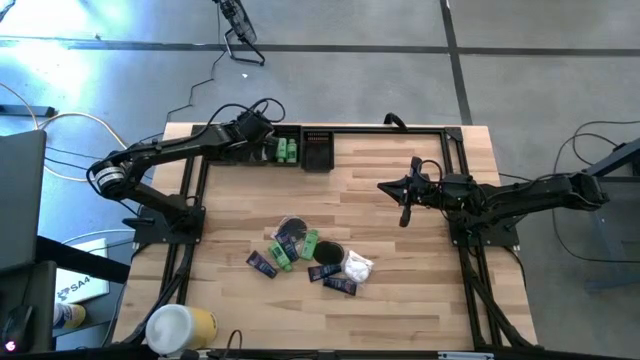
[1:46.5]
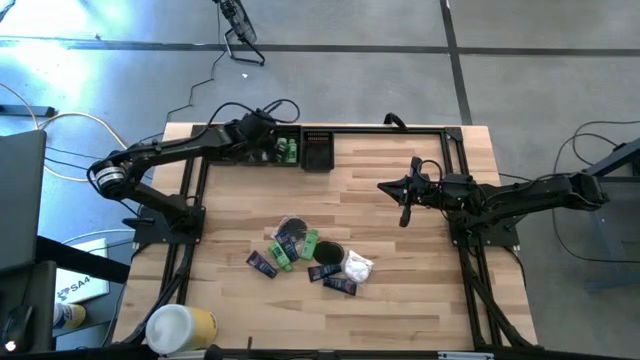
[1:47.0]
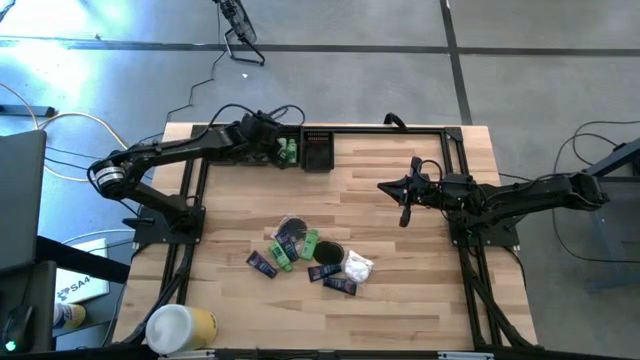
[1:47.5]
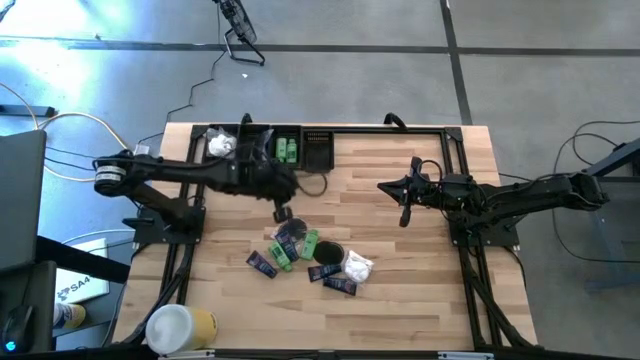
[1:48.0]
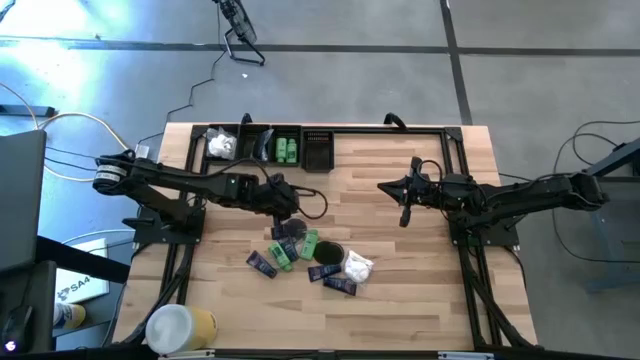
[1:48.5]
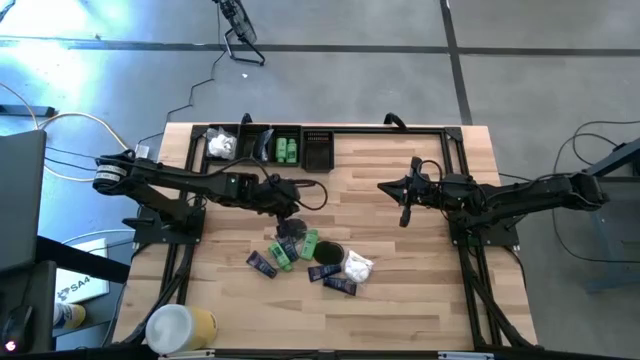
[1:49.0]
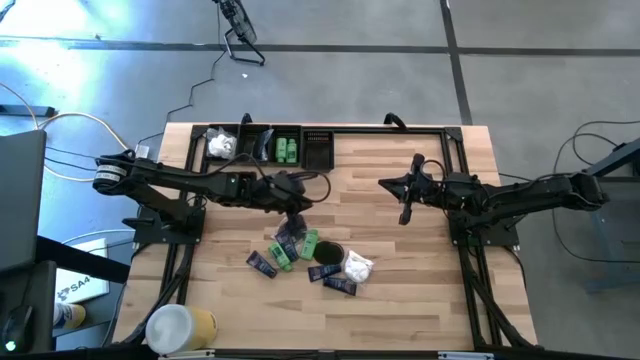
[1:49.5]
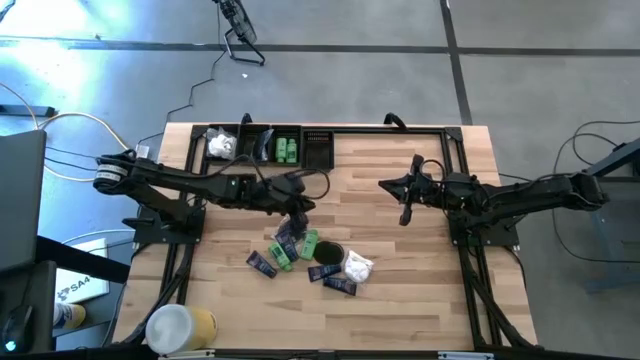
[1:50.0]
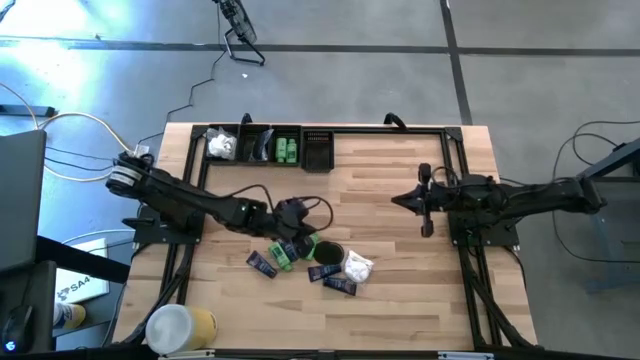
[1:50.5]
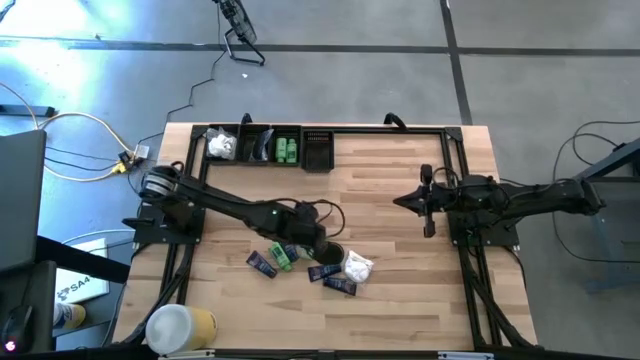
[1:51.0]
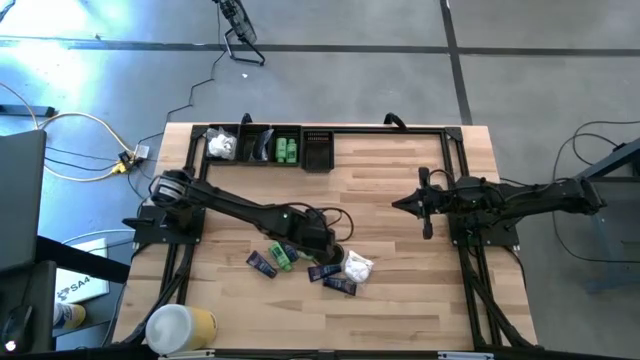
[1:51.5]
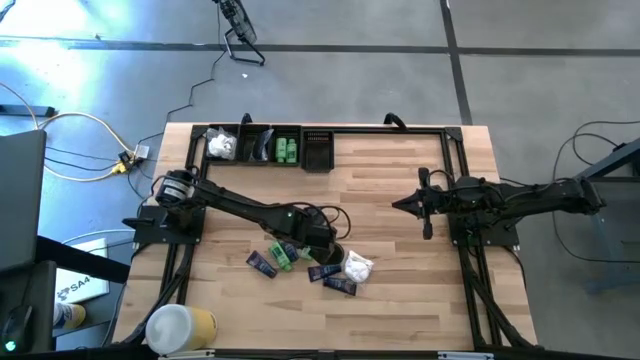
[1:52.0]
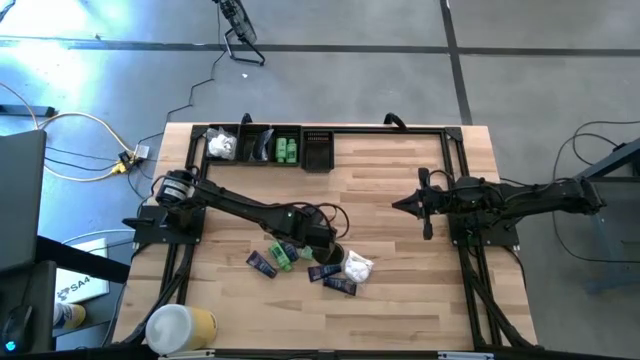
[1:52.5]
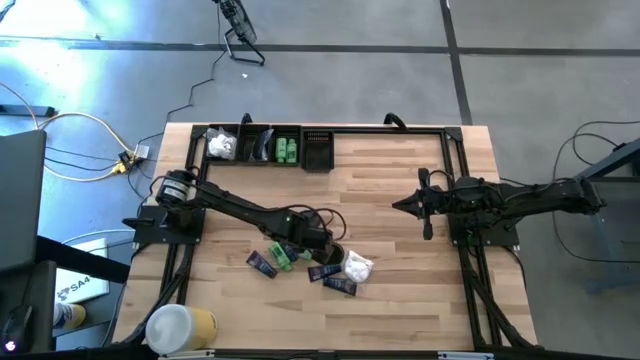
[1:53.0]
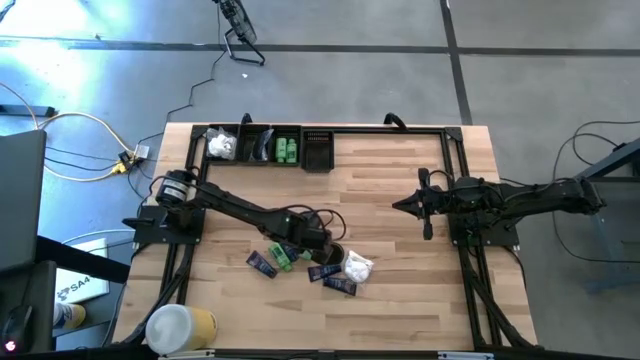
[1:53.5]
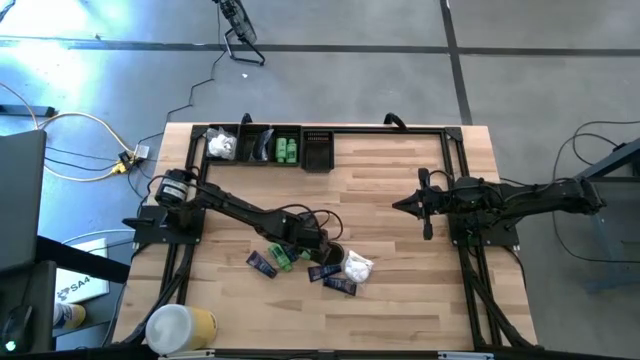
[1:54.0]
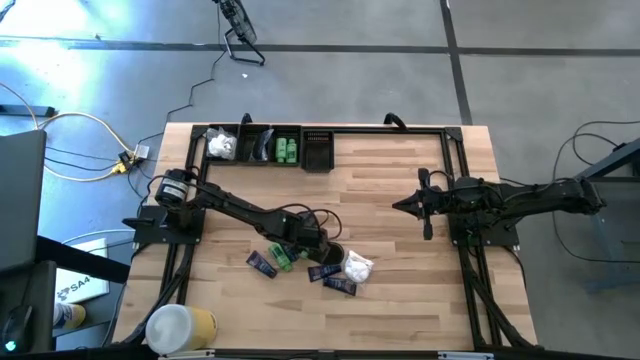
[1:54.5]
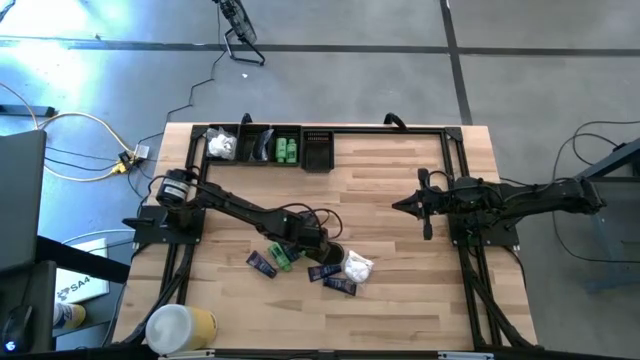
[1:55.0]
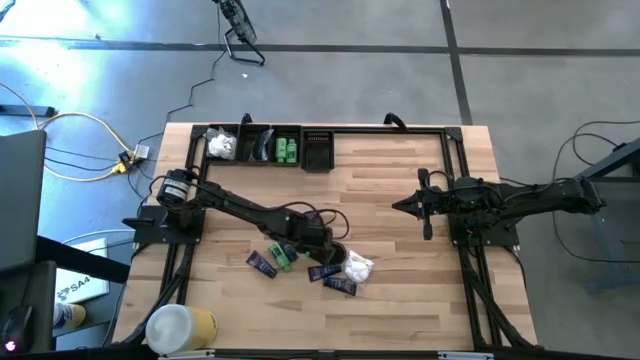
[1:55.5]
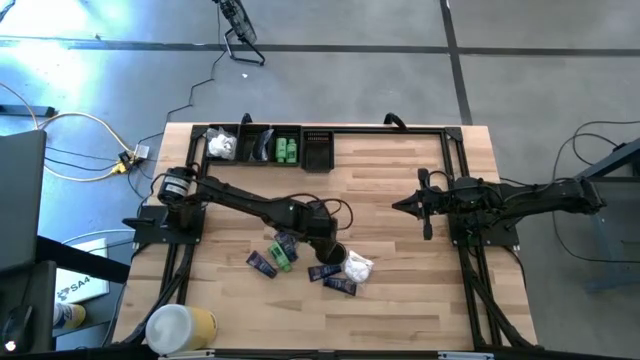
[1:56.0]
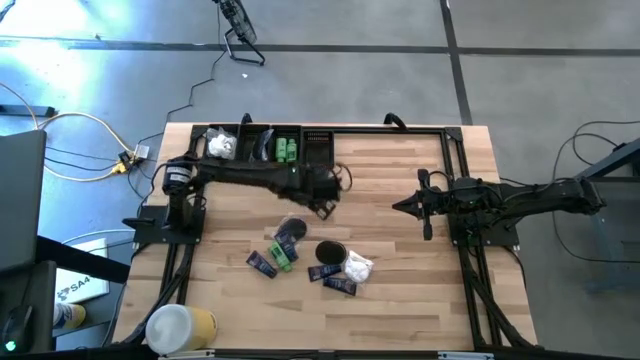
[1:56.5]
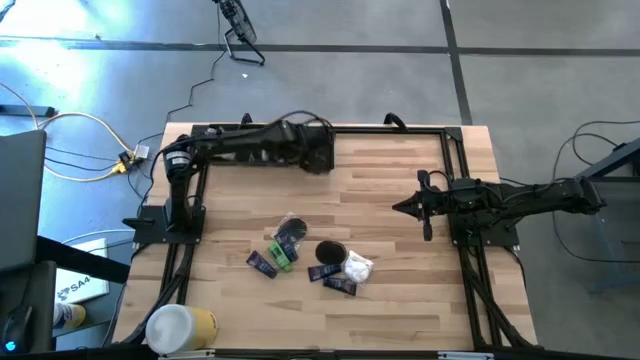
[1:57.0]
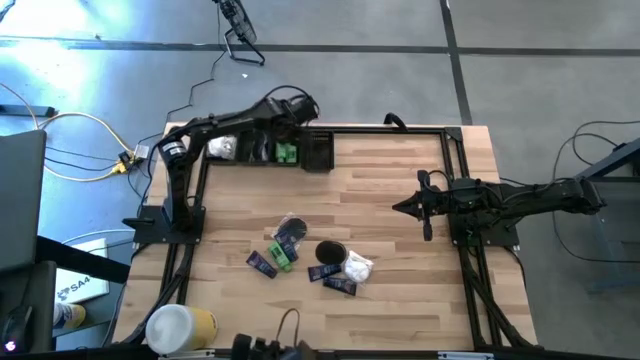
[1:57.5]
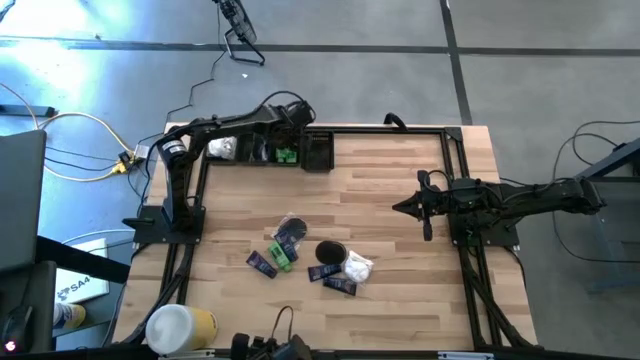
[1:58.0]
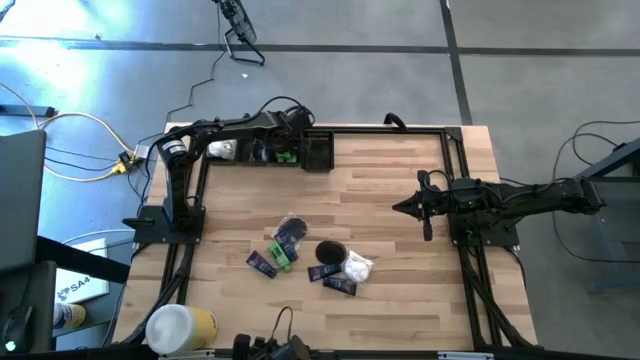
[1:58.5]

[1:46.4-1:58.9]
Task: Pick & Place Travel size toiletries
Put the shampoo into the middle right black bin

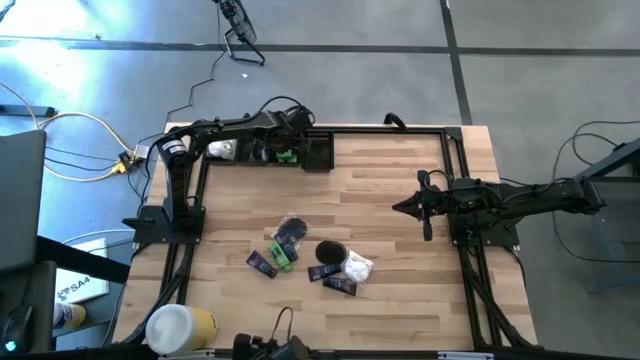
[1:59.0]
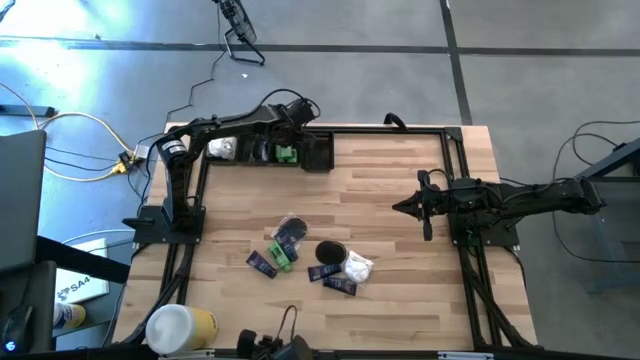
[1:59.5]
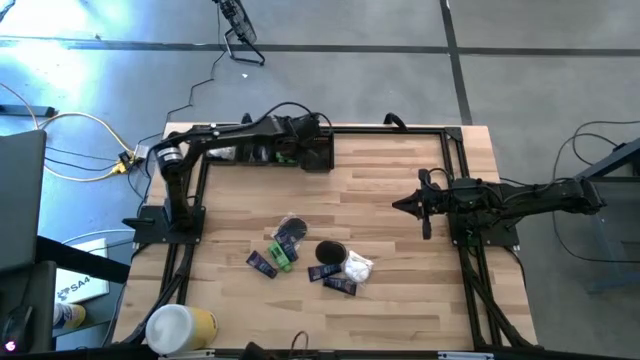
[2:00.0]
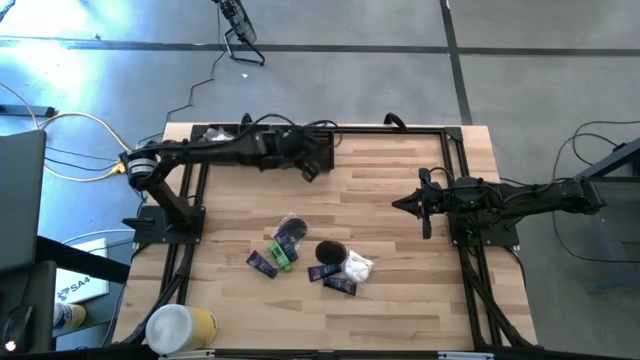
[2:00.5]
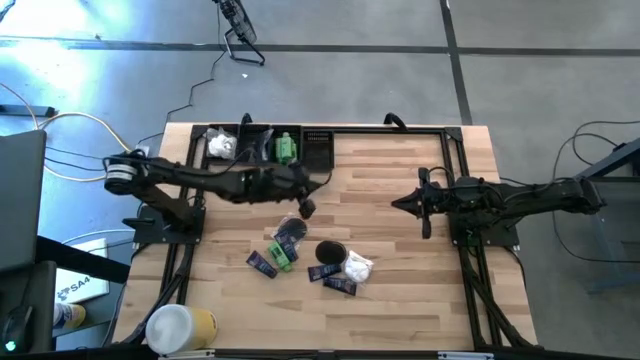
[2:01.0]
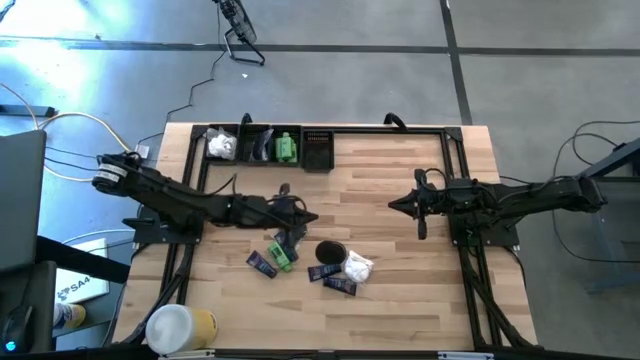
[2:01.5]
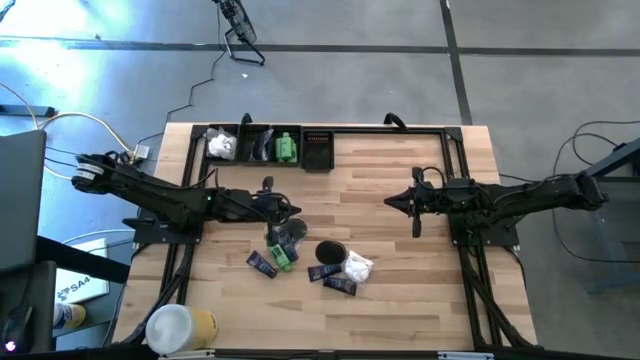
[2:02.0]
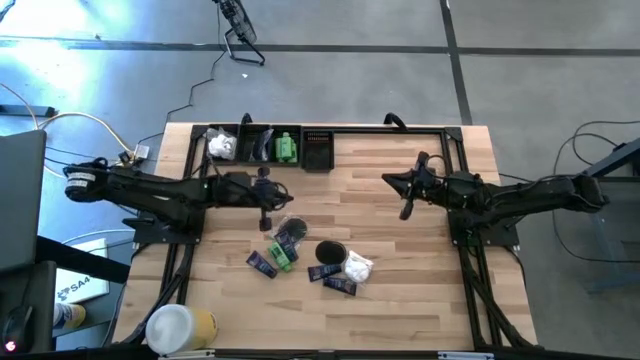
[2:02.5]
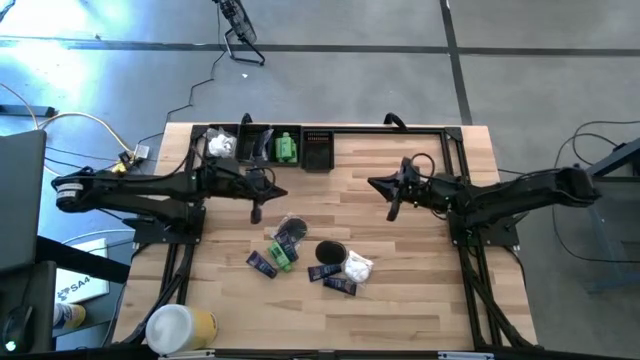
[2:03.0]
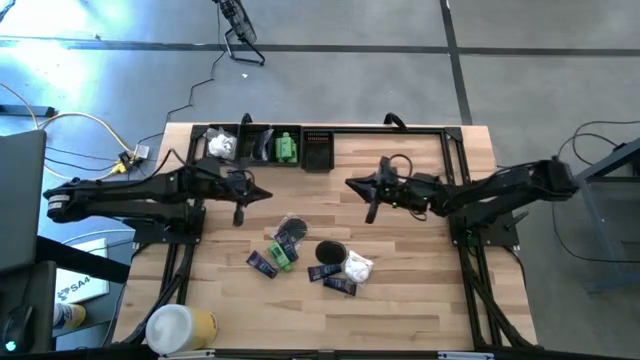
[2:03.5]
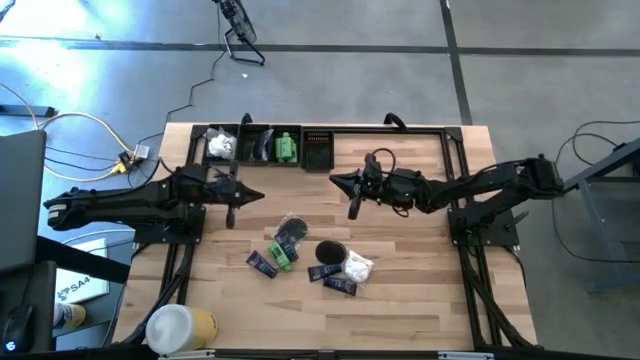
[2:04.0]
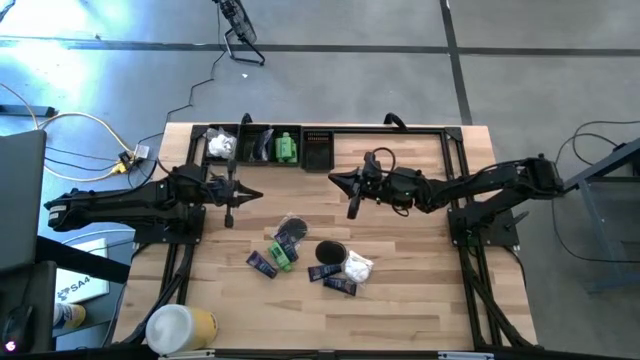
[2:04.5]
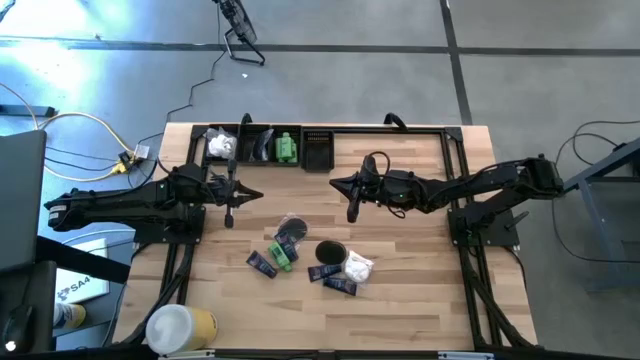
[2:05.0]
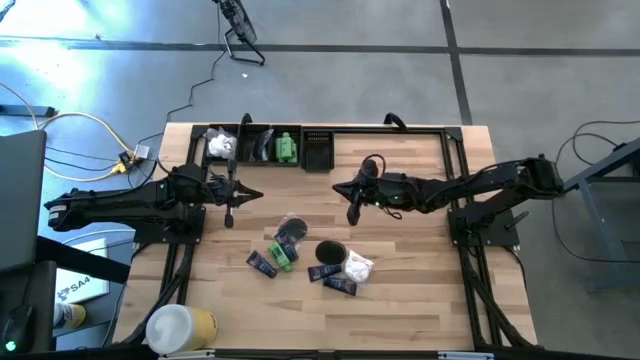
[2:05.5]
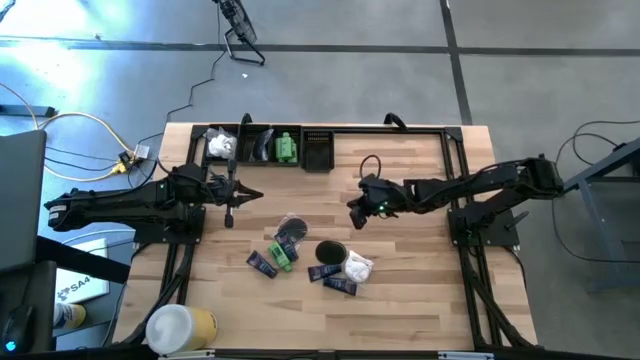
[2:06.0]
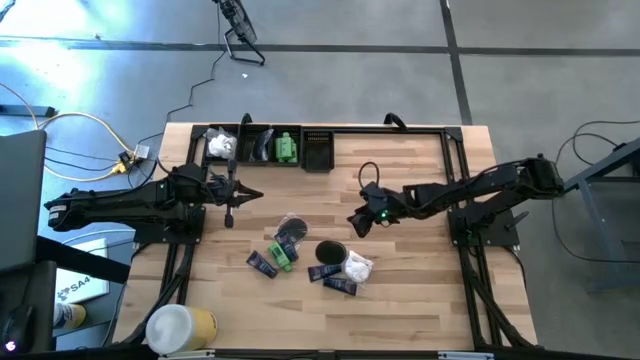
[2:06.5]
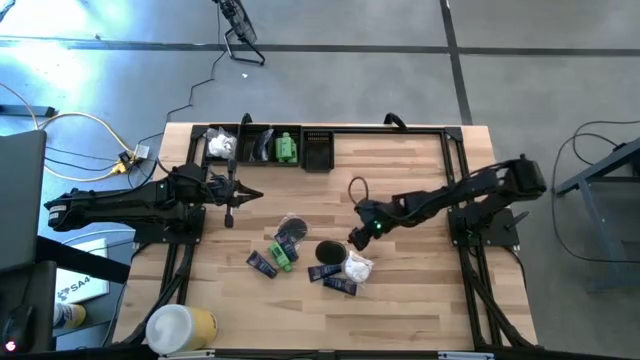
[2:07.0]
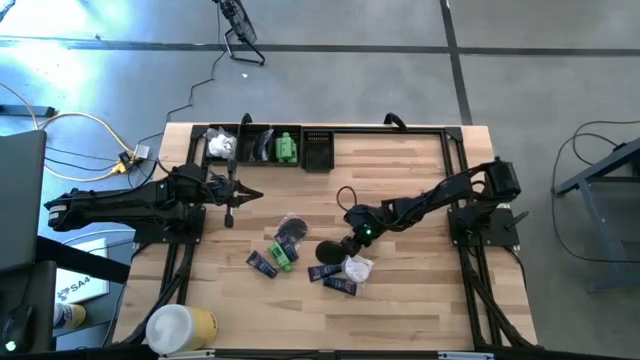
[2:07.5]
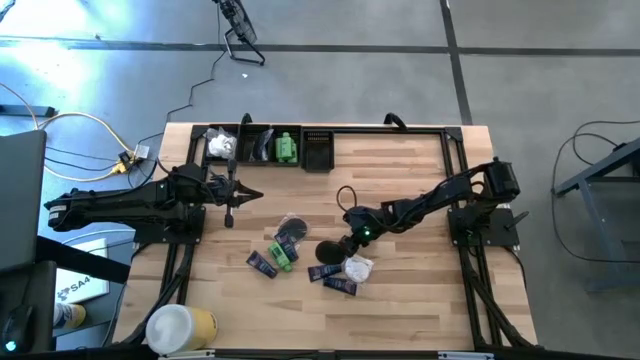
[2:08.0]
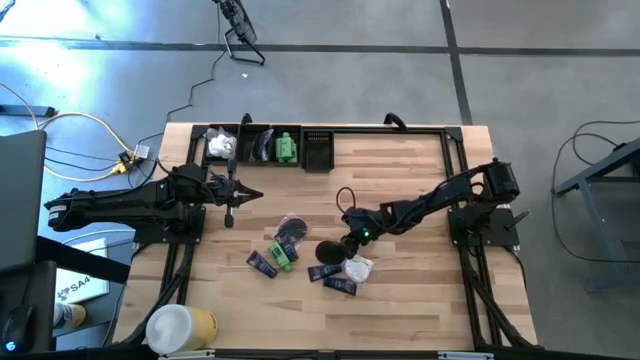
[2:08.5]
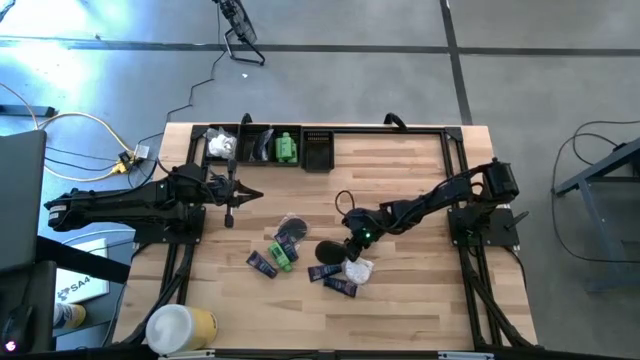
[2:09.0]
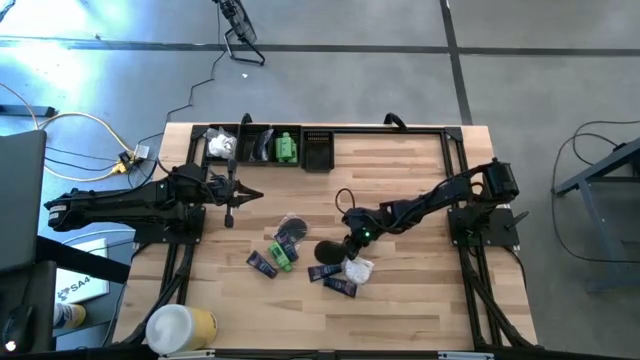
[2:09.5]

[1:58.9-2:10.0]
Put the hairbrush into the middle left black bin
